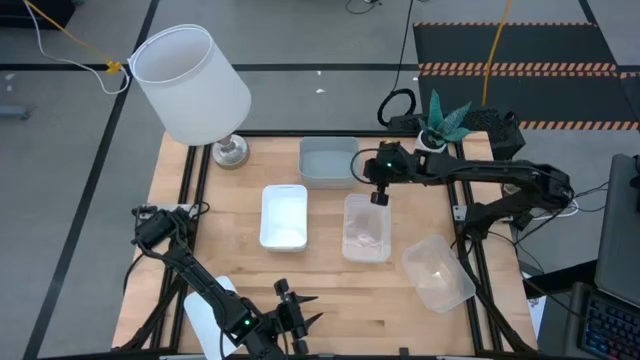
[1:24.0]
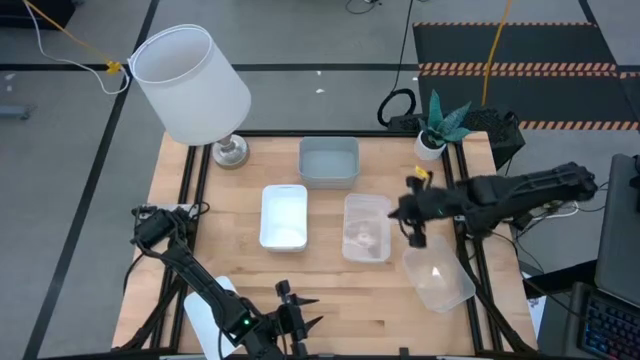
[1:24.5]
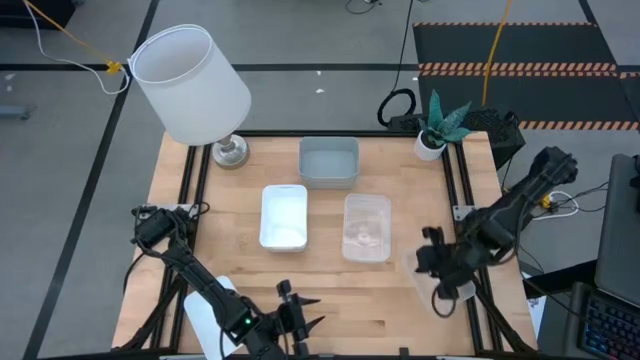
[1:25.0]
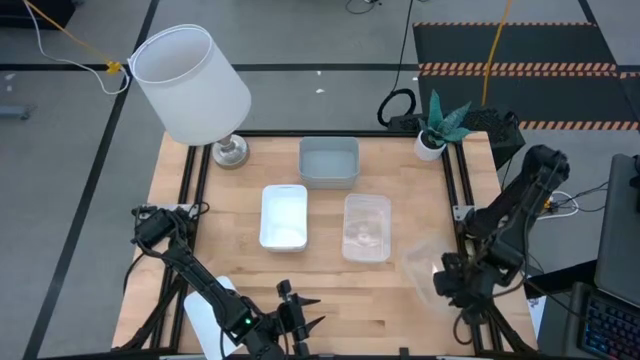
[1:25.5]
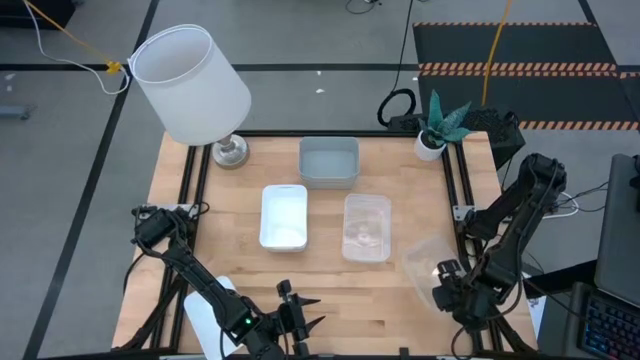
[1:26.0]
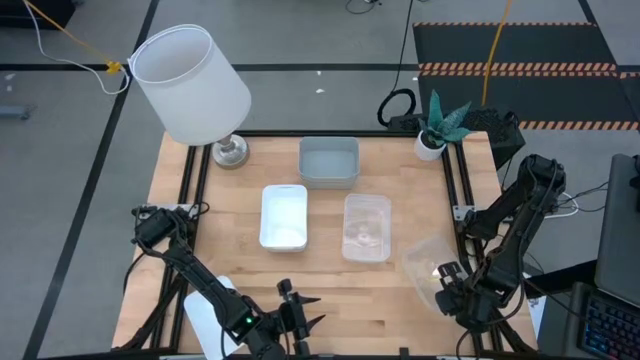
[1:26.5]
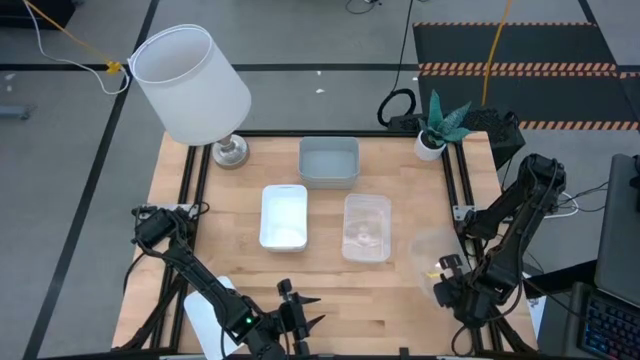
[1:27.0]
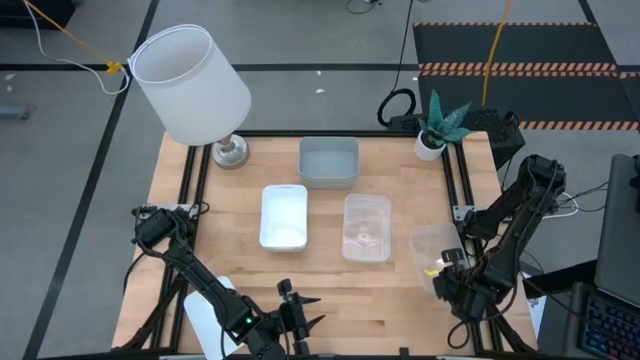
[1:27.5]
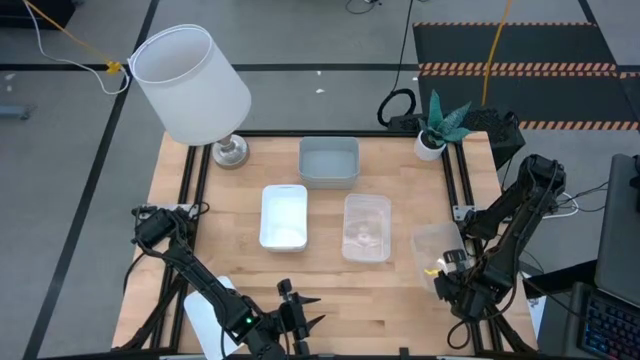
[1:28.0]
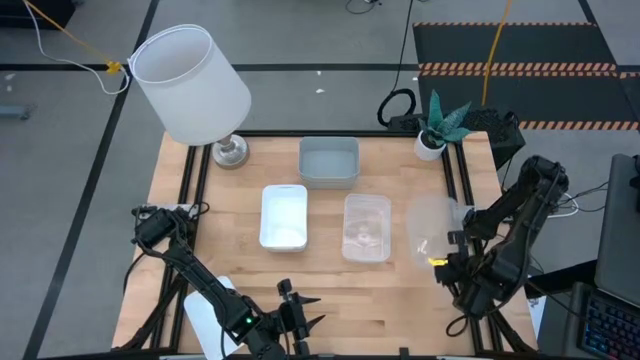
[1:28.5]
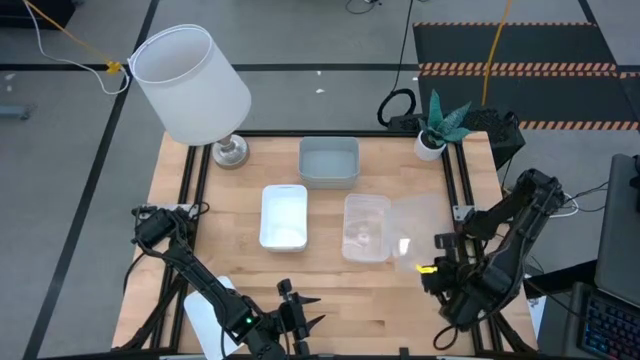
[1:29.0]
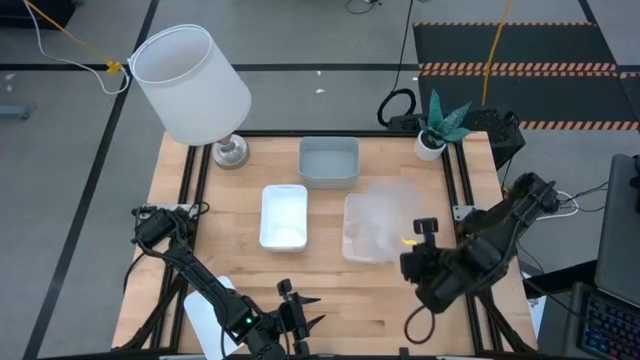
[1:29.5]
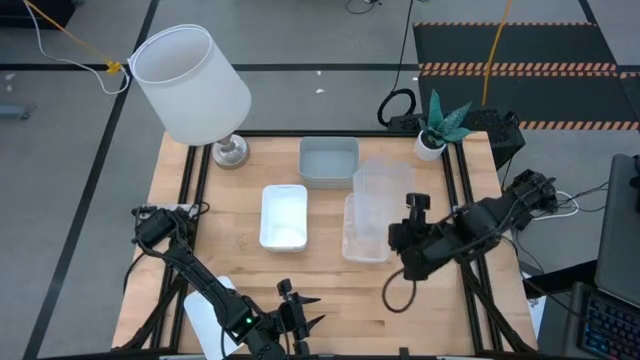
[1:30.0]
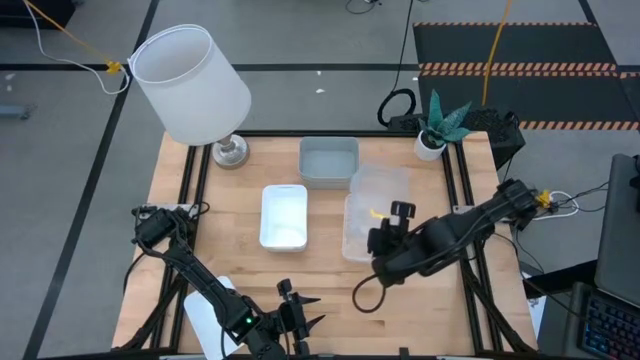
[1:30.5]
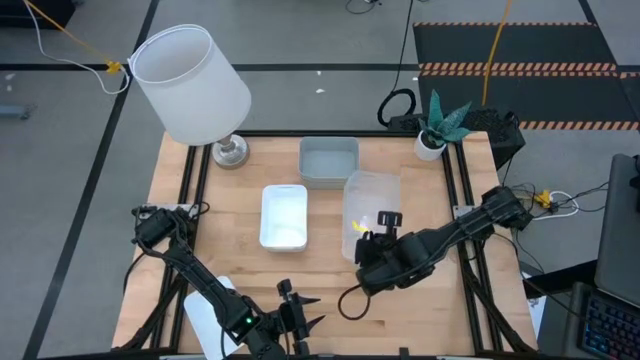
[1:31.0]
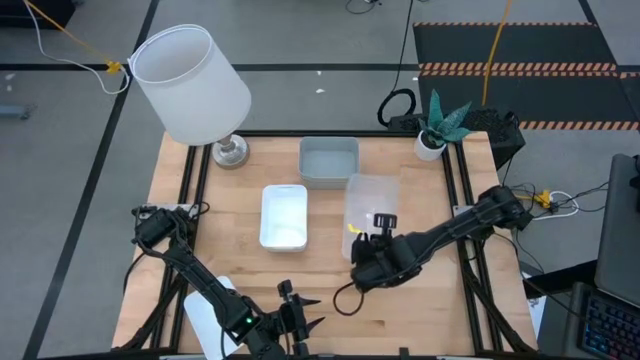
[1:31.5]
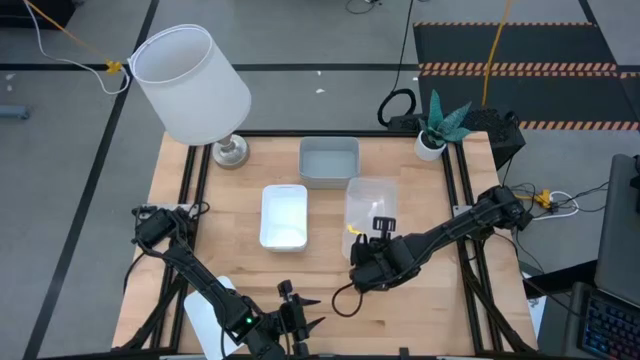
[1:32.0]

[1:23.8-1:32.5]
Stack the bottom transparent bin on top of the top transparent bin

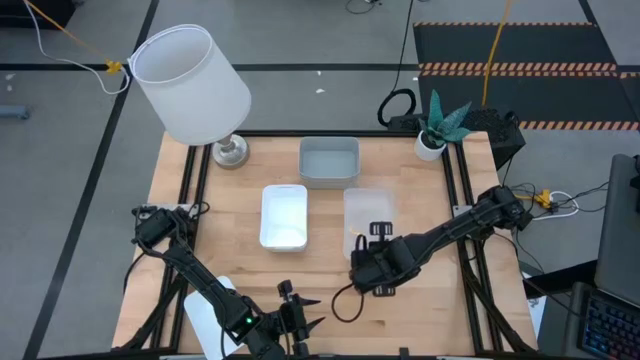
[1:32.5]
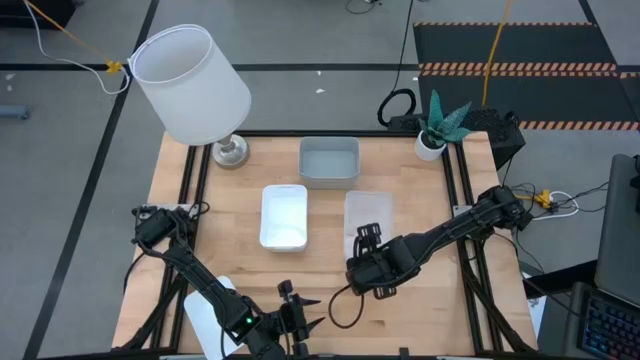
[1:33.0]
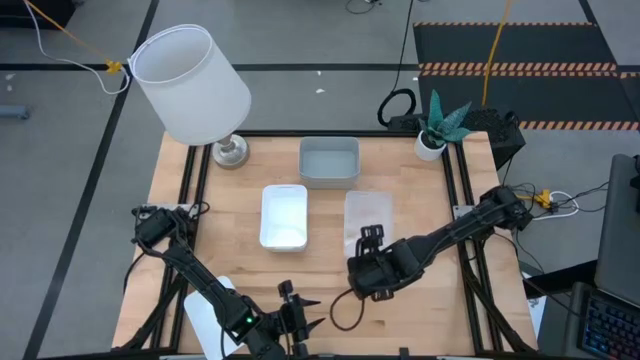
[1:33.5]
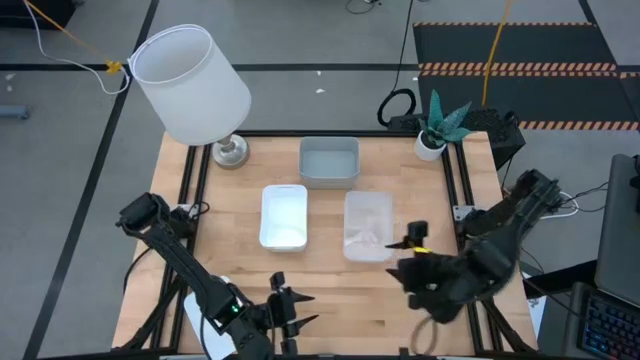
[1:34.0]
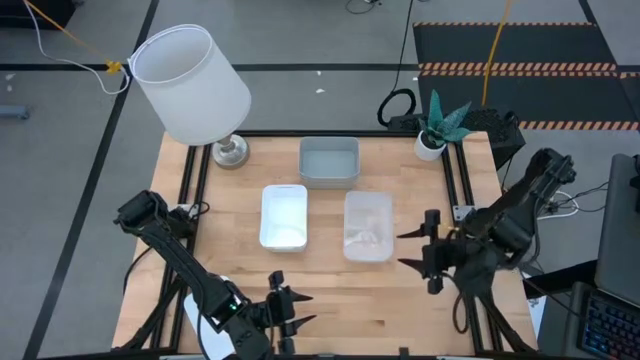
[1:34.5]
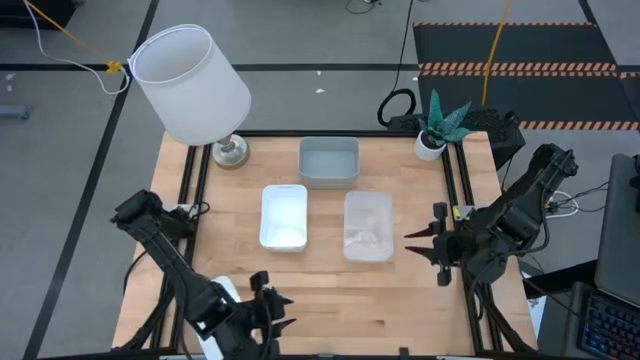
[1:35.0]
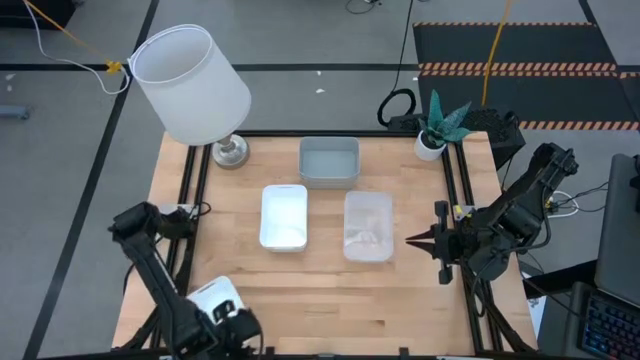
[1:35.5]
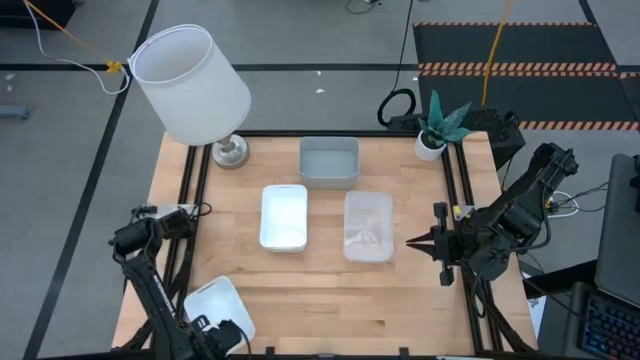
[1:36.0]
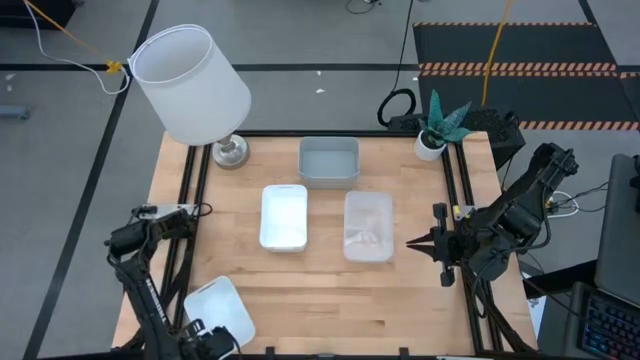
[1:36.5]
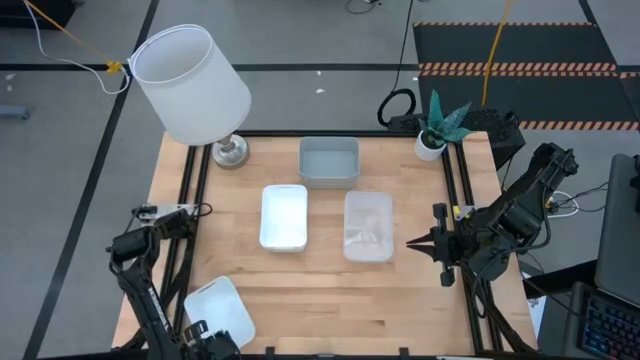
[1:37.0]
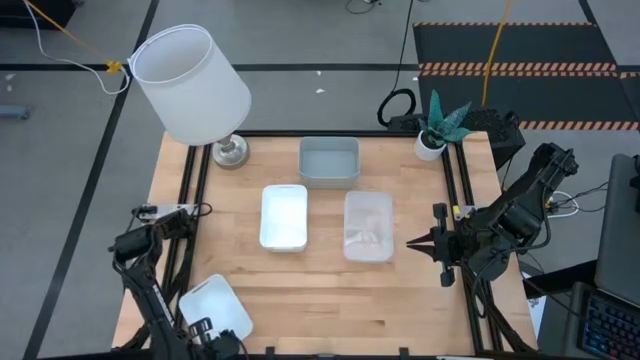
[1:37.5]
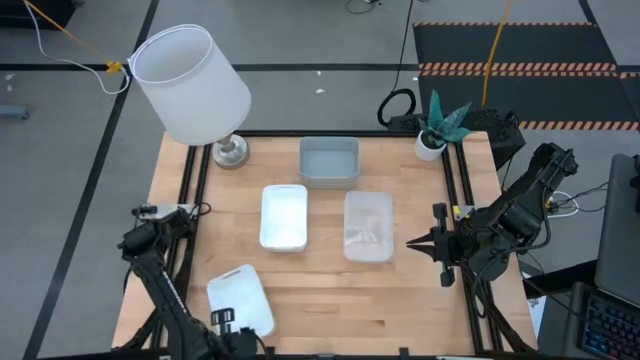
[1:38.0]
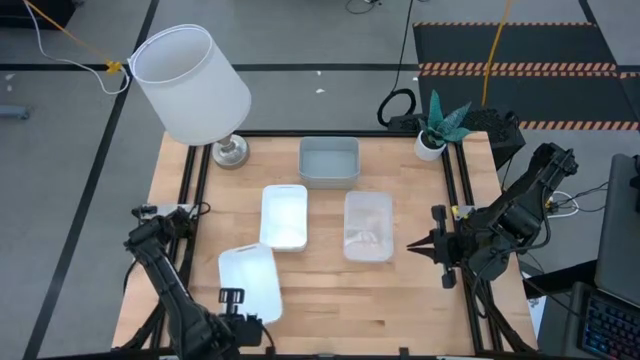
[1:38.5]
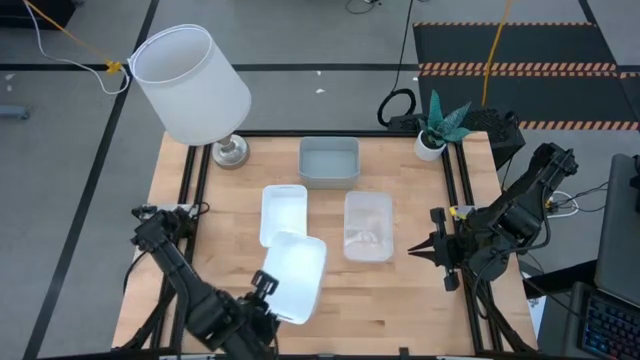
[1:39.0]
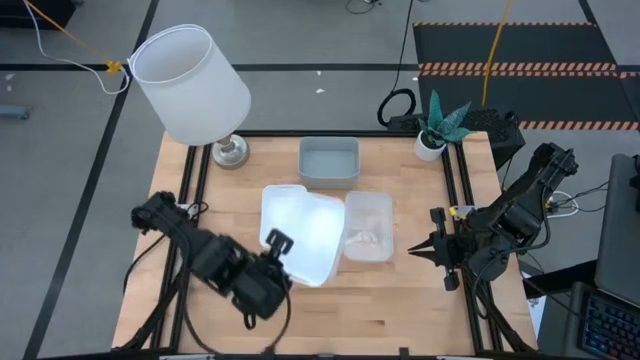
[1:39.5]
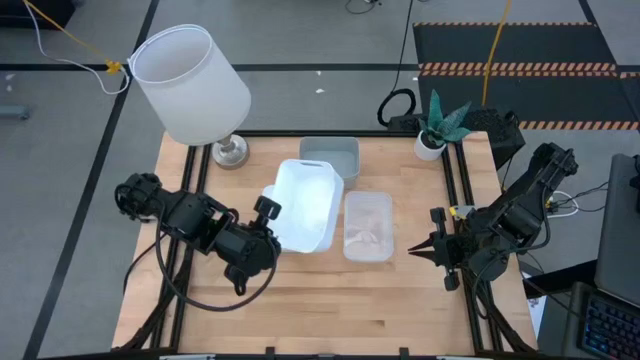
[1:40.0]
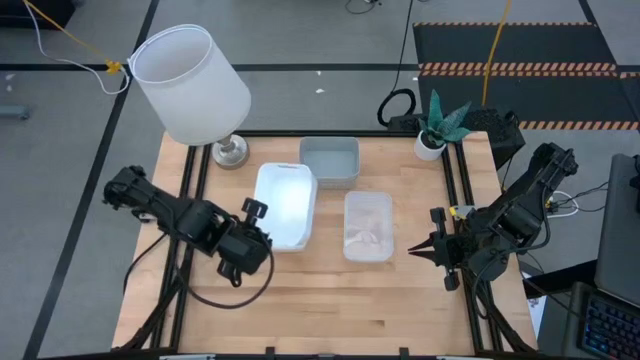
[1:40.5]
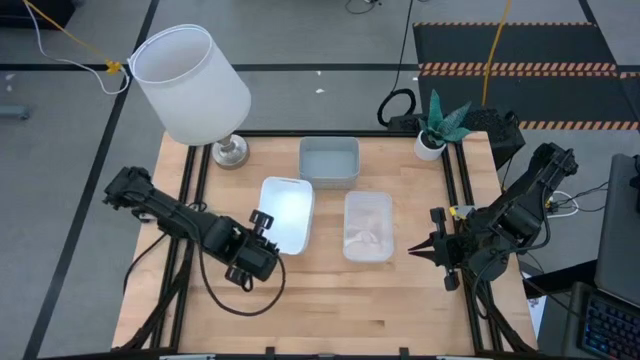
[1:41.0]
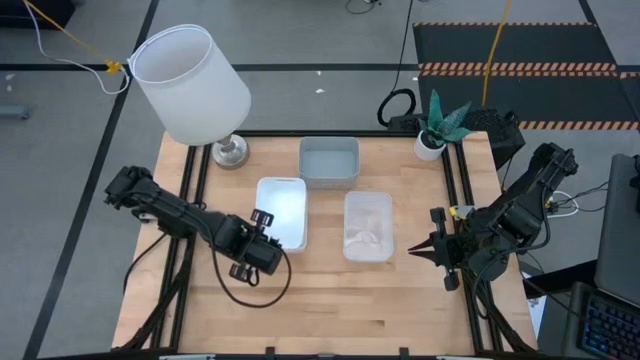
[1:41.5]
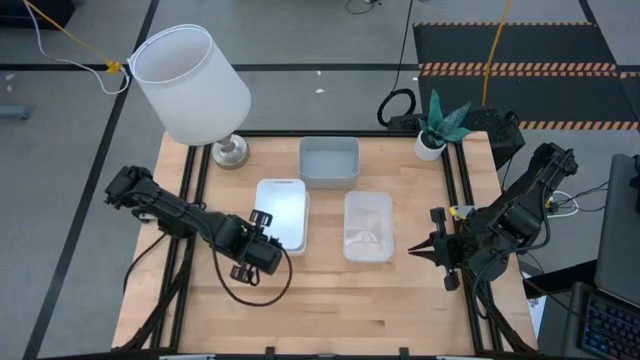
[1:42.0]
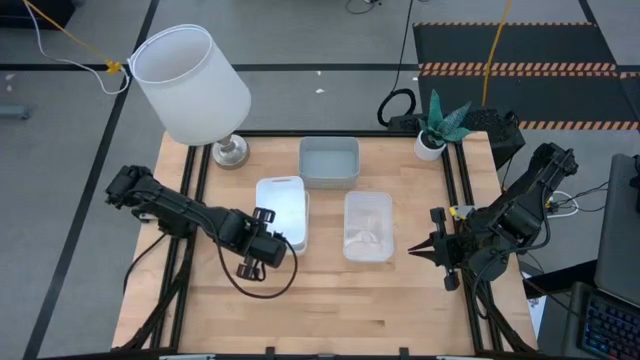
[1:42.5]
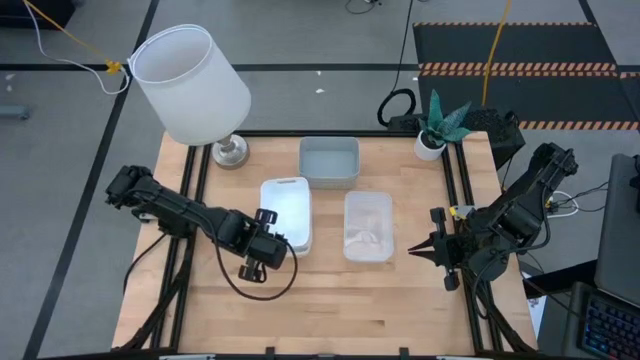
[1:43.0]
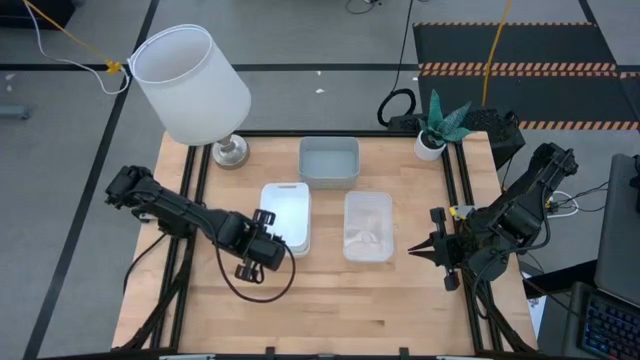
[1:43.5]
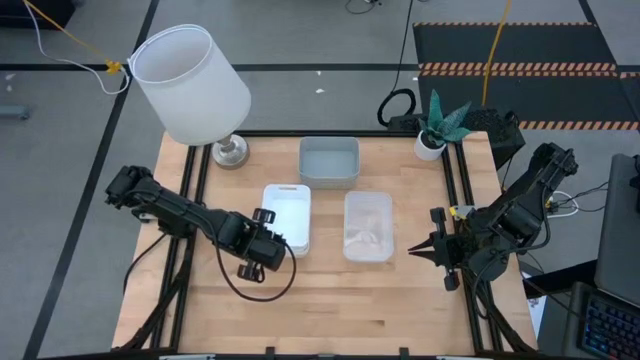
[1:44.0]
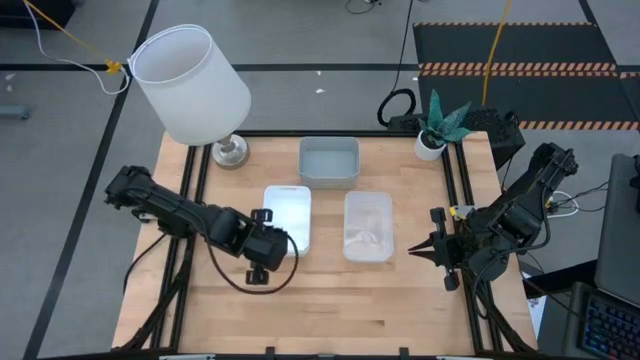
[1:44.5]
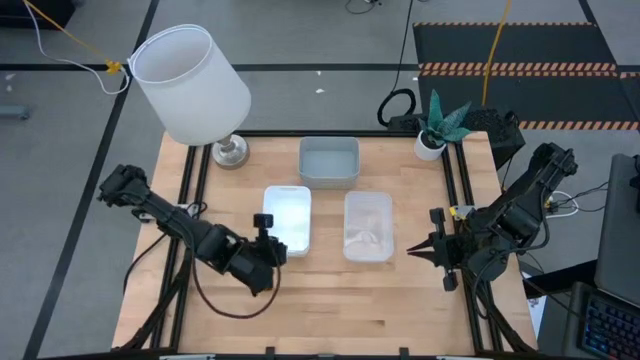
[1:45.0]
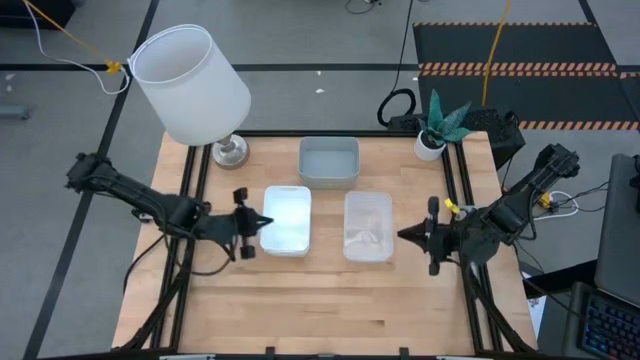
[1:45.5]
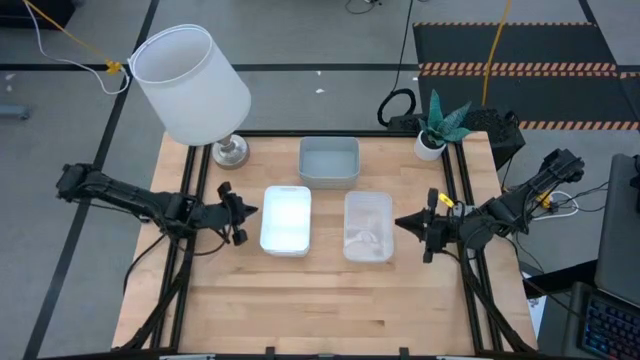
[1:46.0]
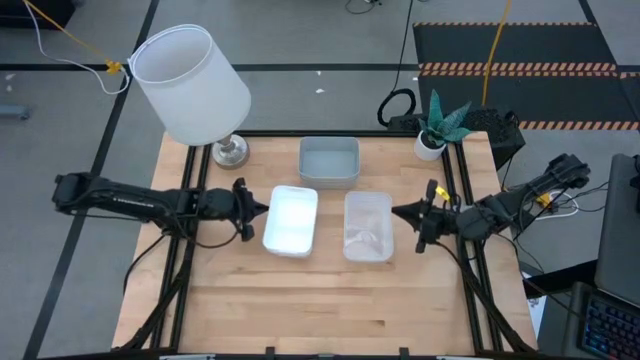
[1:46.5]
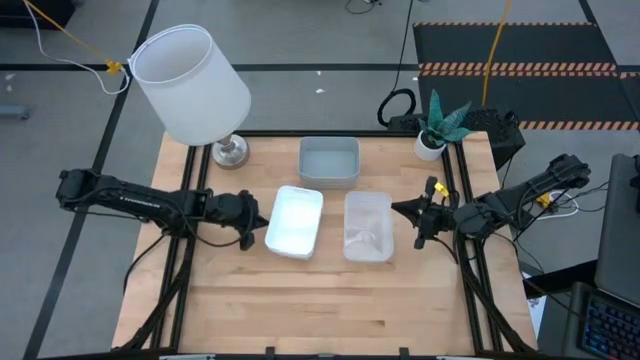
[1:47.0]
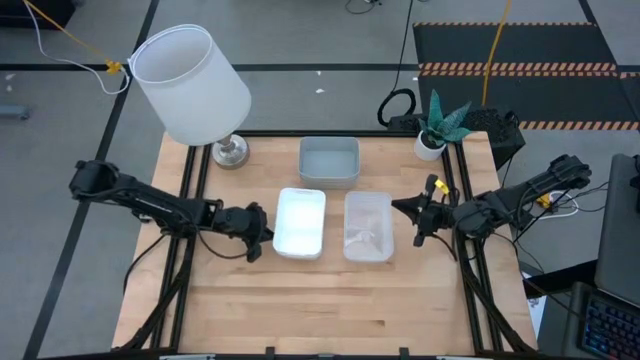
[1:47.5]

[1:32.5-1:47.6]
Stack the bottom white bin on top of the top white bin
